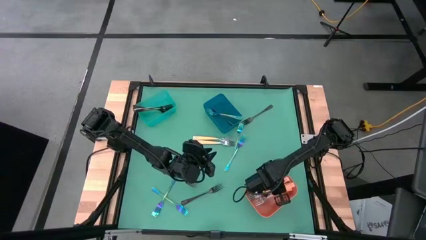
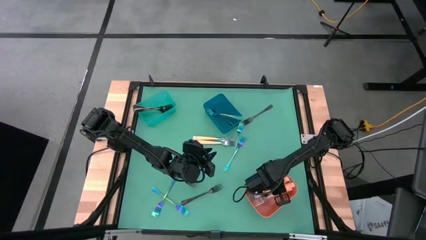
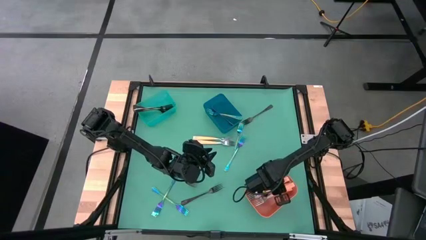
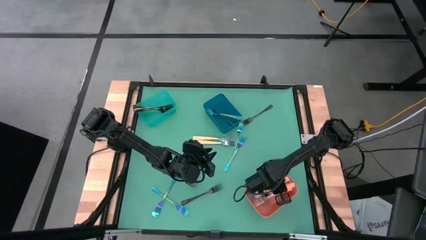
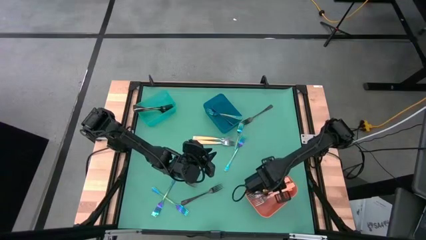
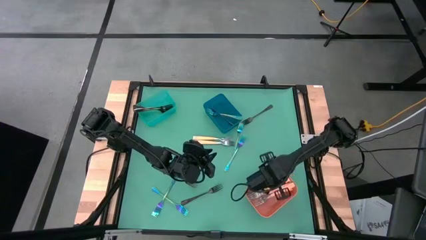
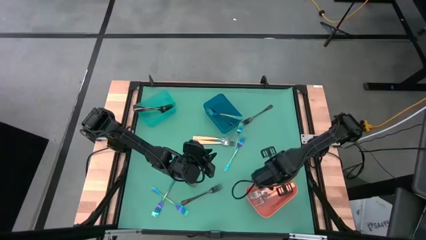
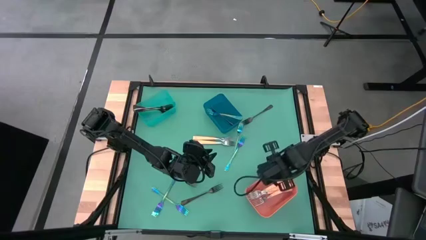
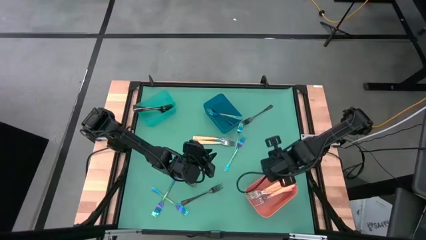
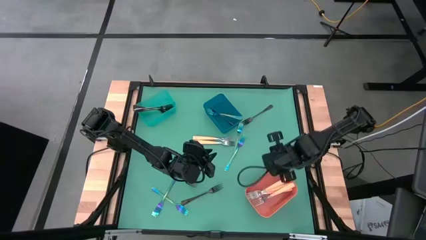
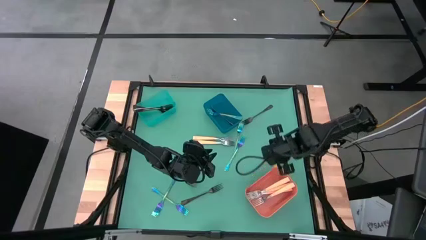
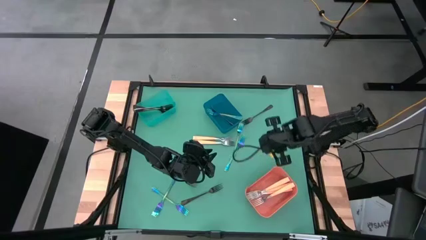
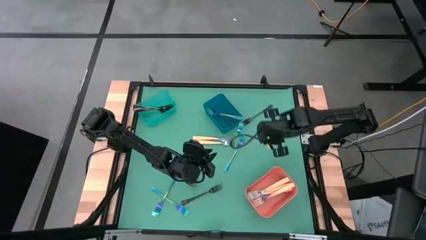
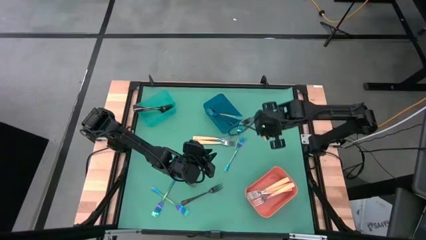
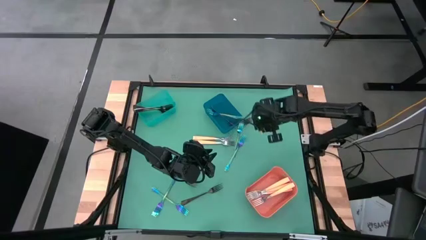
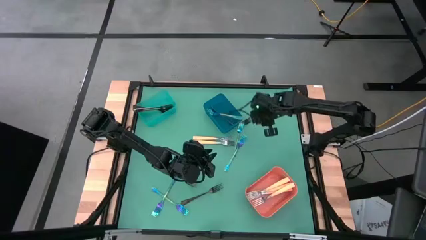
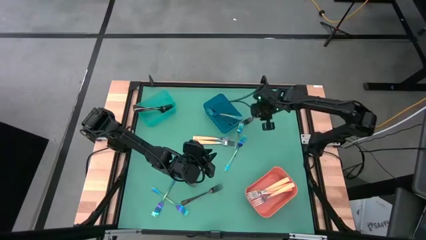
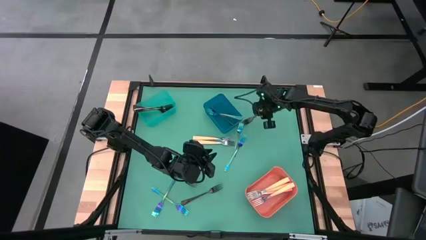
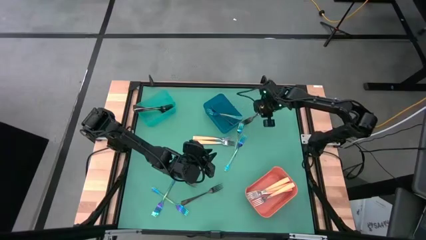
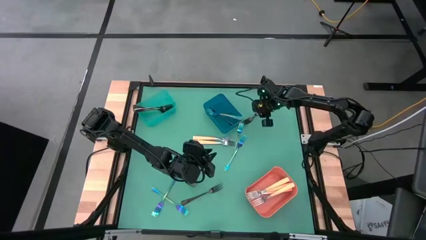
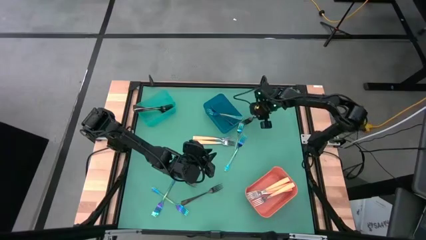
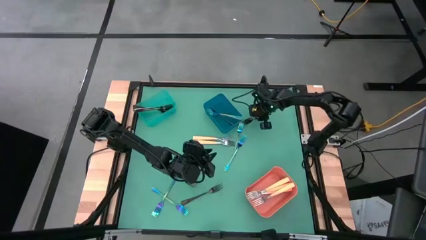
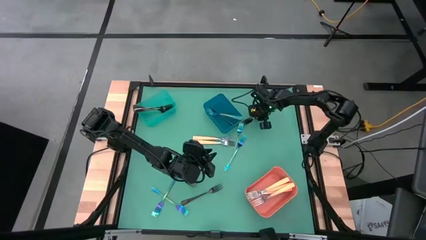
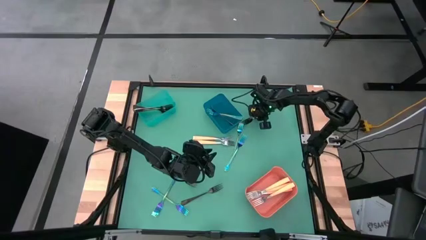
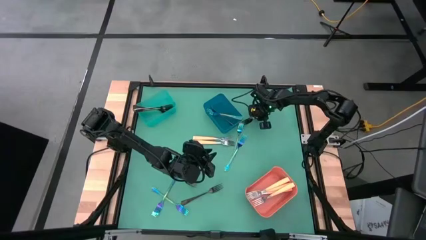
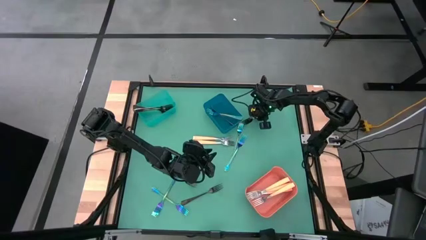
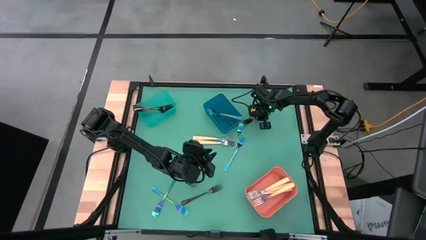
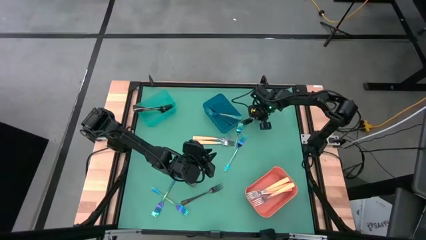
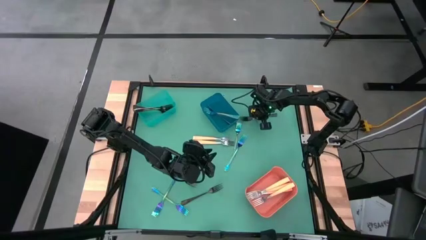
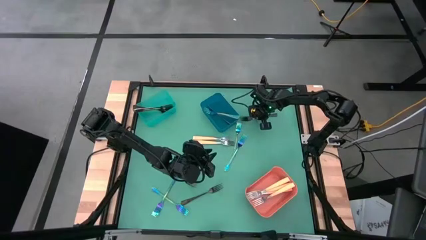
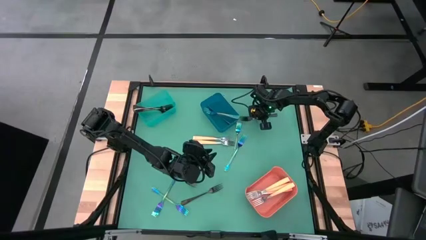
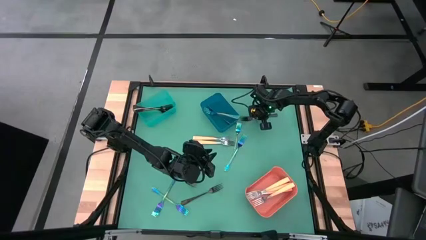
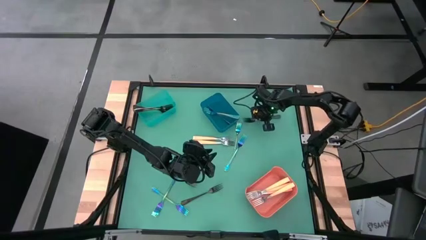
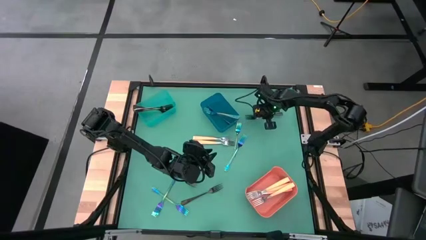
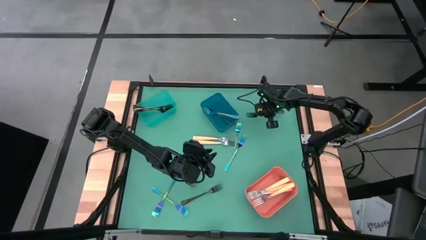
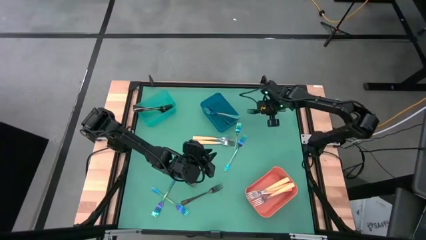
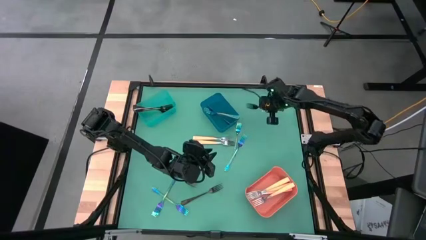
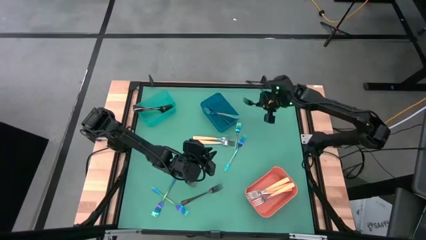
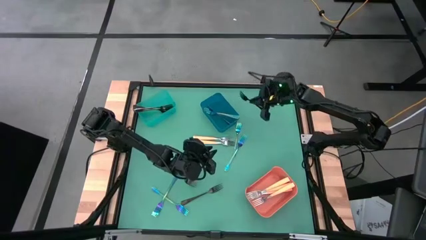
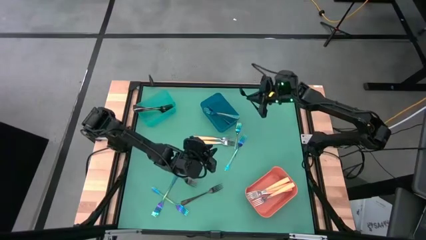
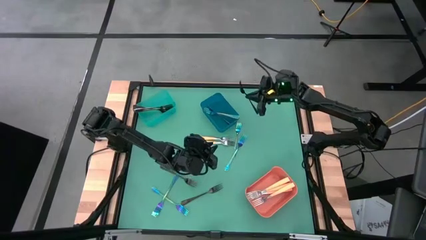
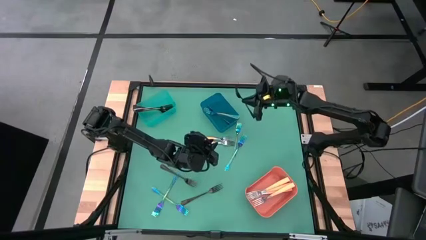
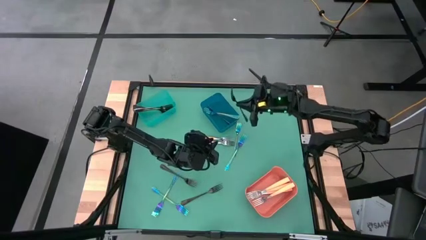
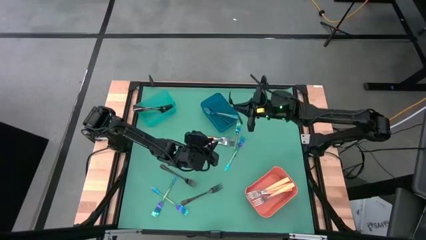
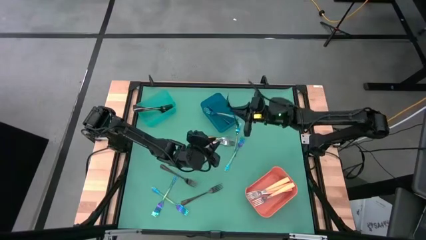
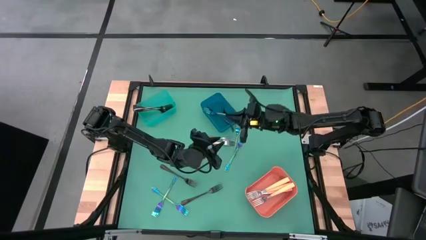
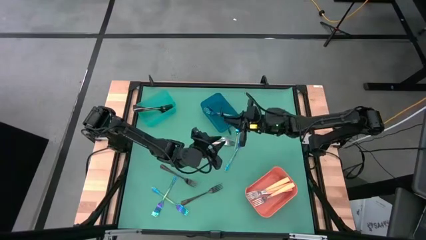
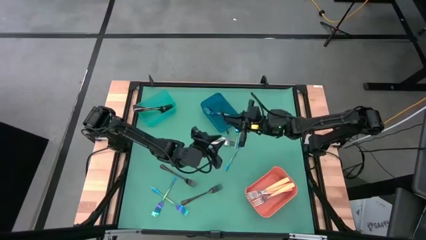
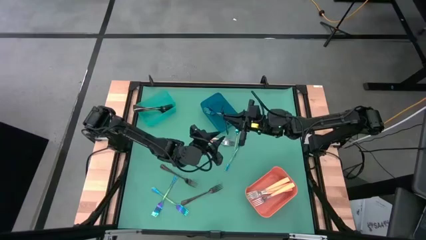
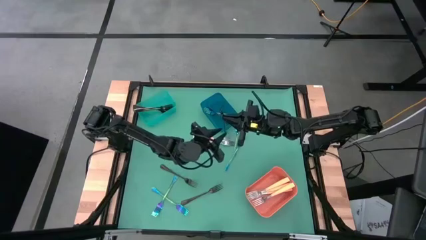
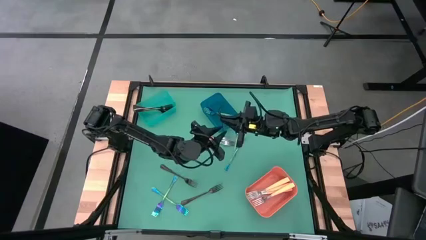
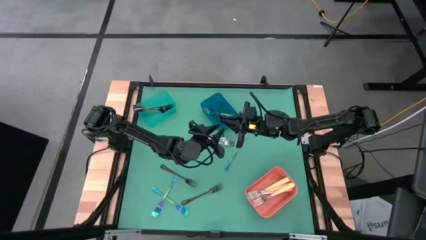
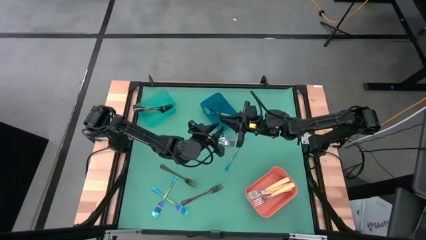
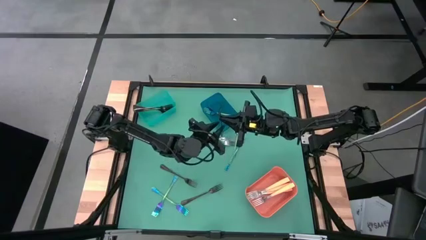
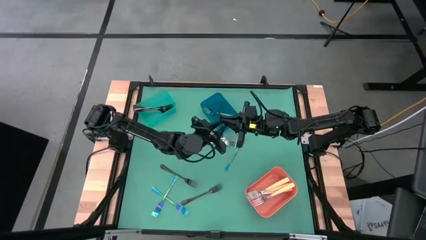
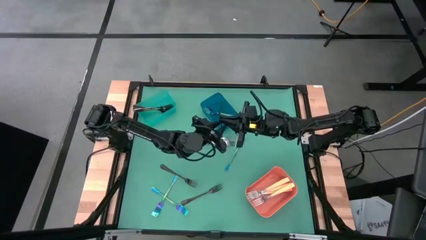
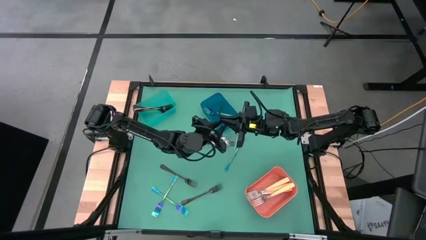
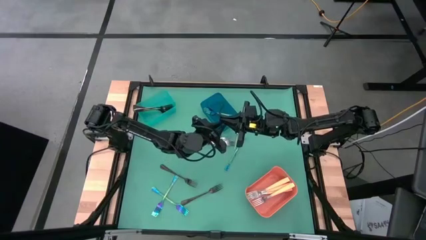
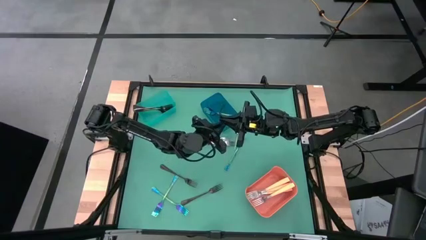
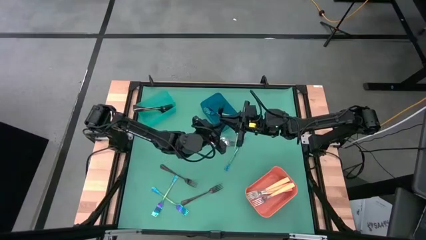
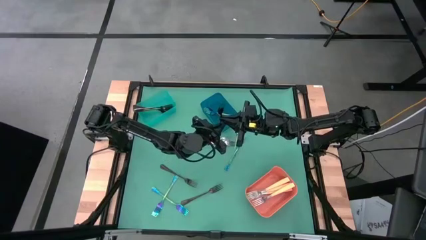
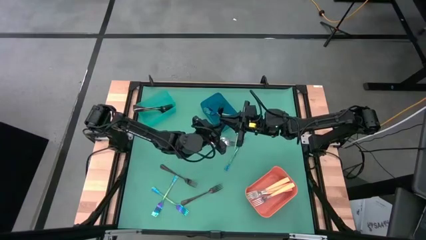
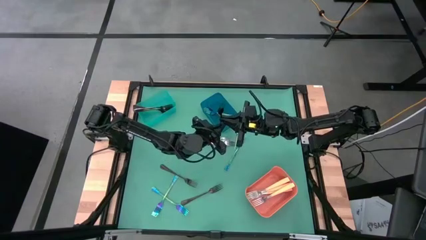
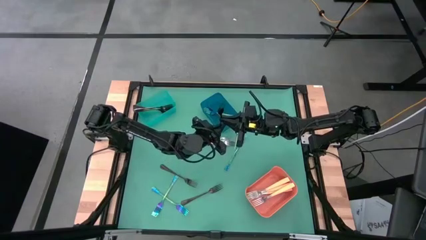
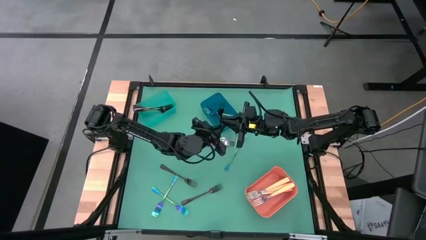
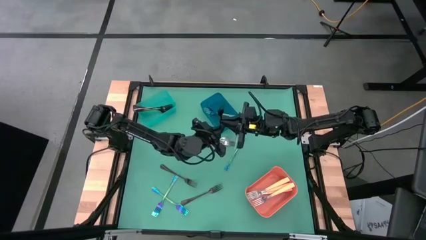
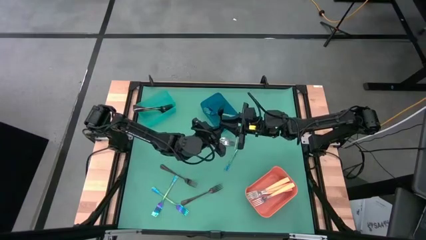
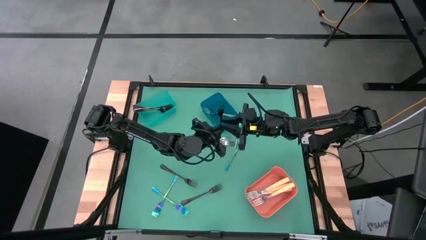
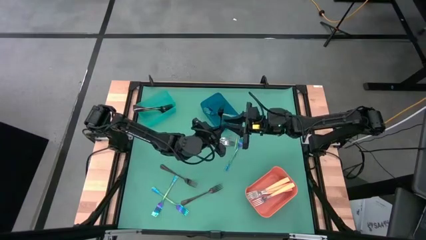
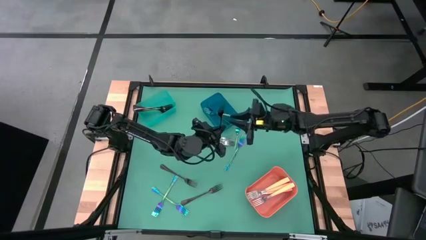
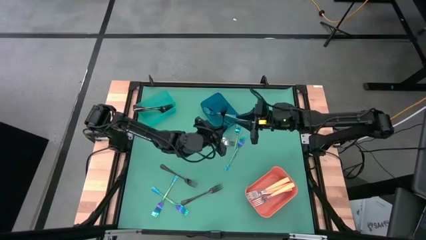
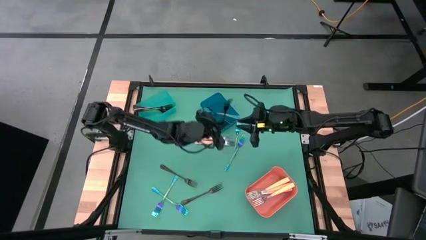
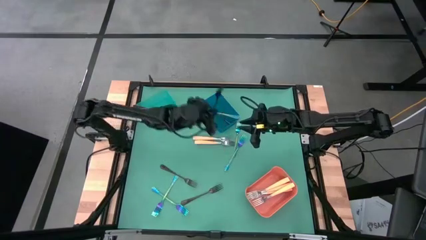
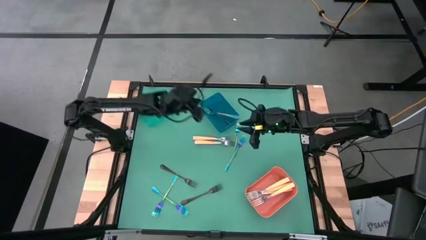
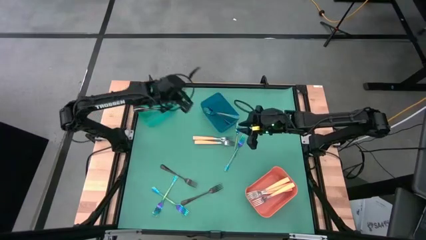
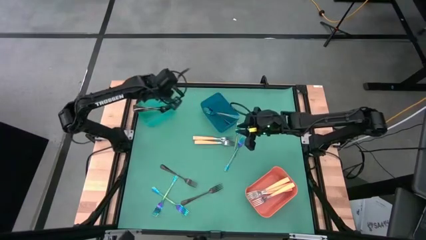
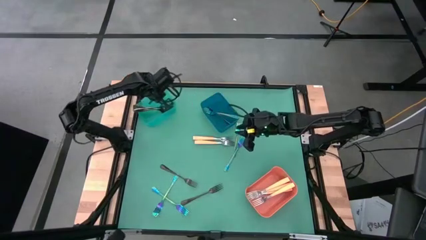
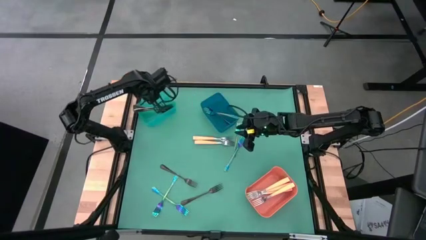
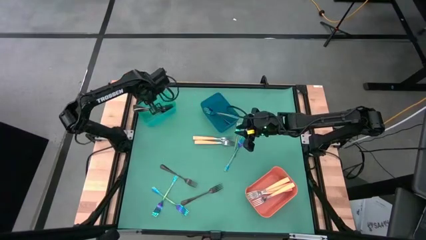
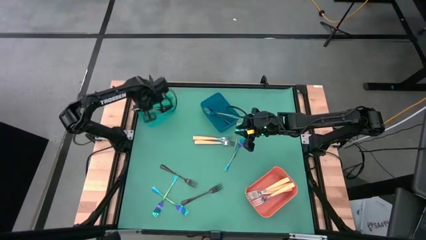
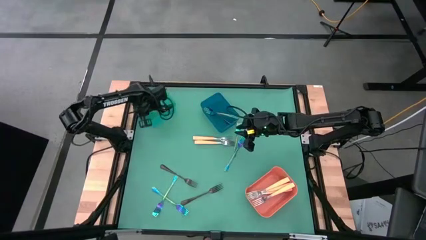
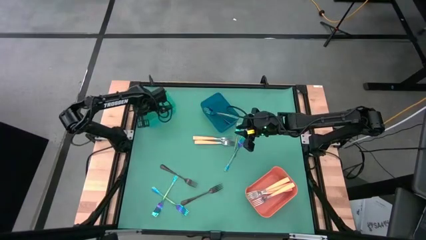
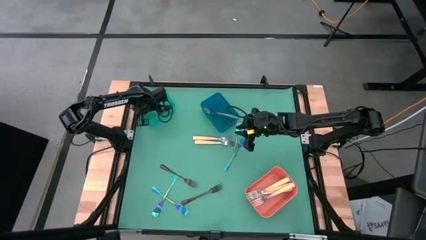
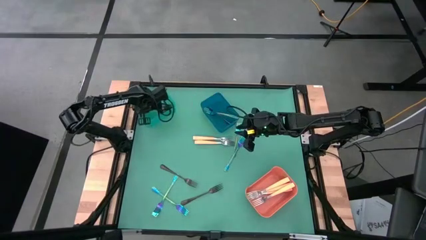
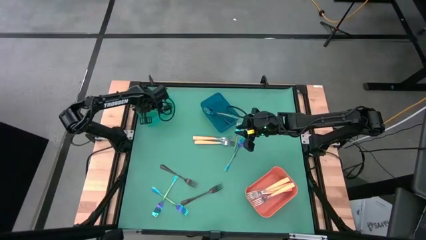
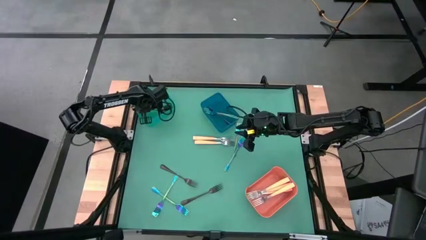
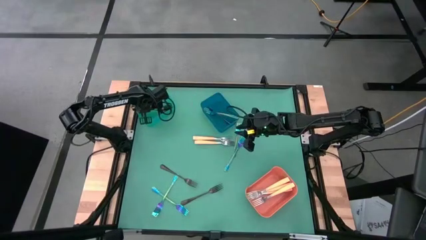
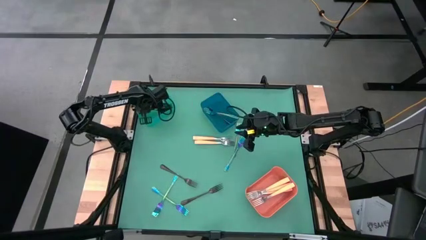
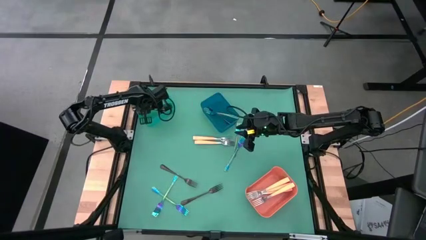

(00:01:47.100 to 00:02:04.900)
Task: Sort silverware by color (type)
Put the black fork into the green bin
